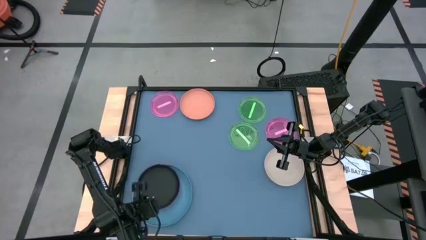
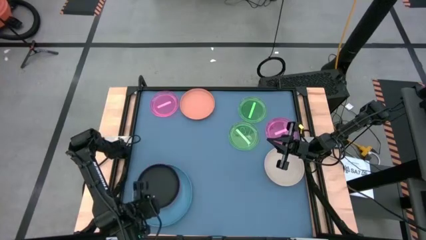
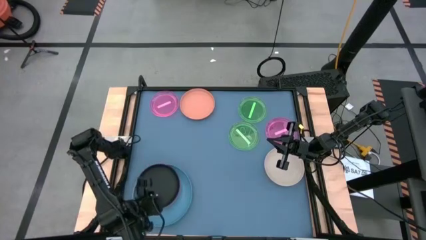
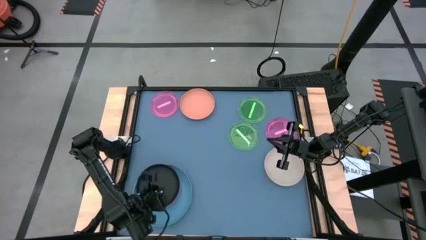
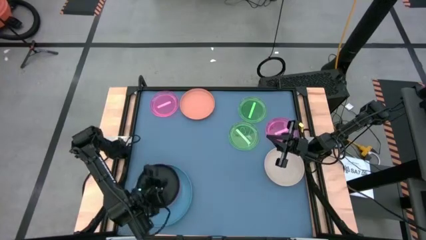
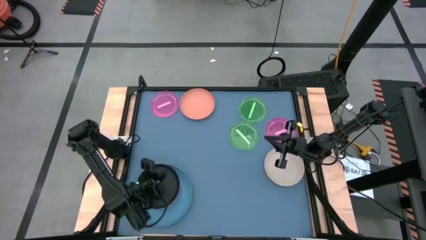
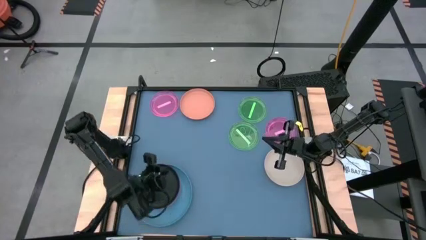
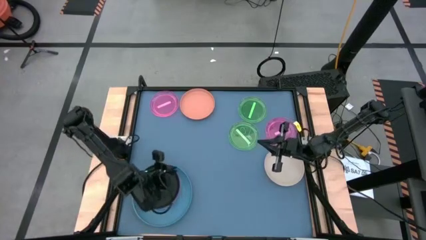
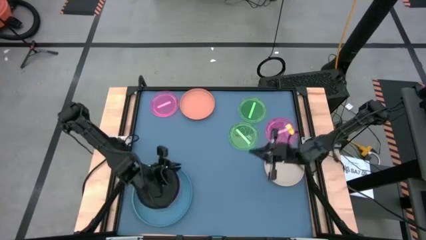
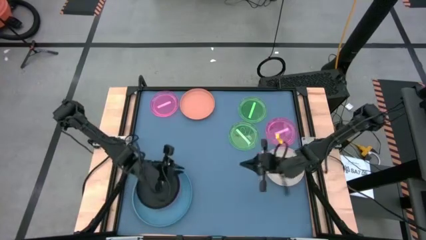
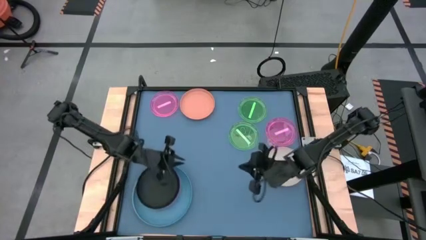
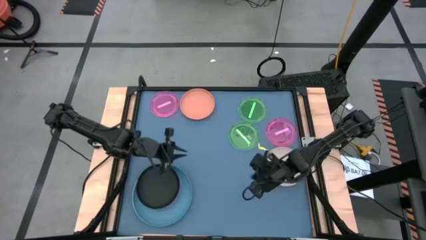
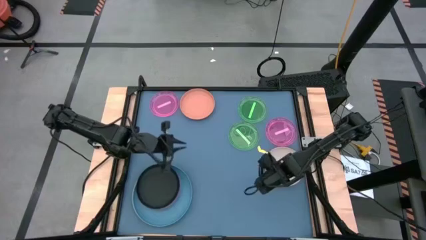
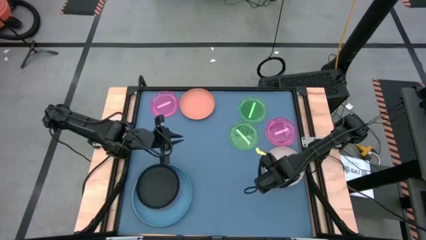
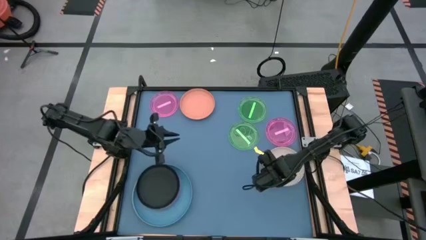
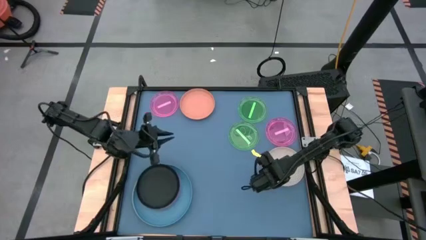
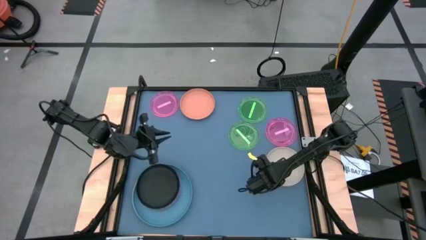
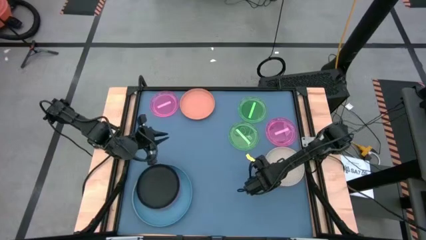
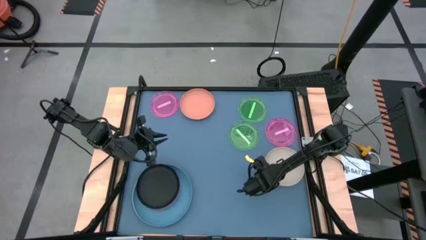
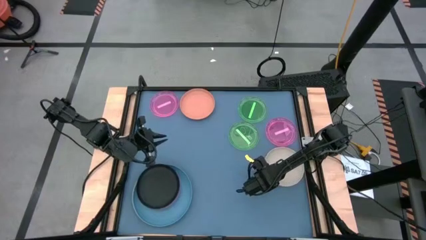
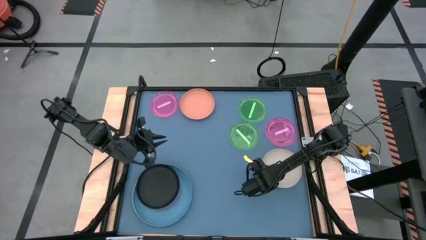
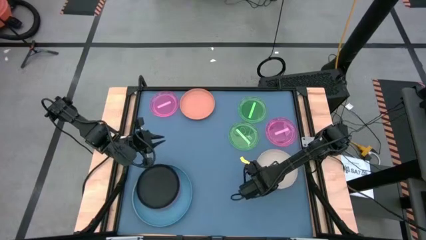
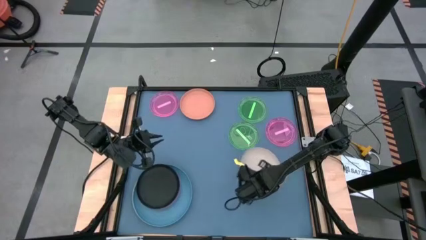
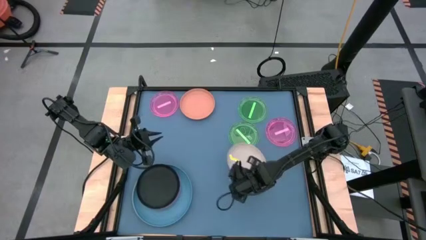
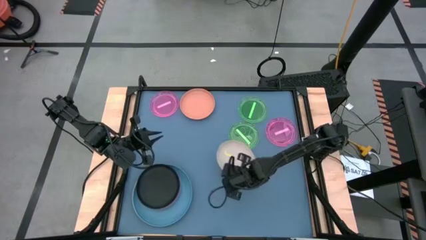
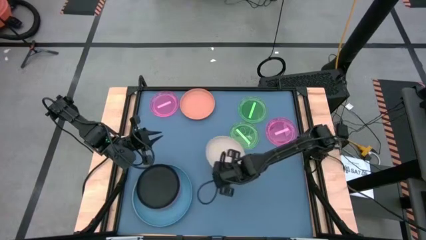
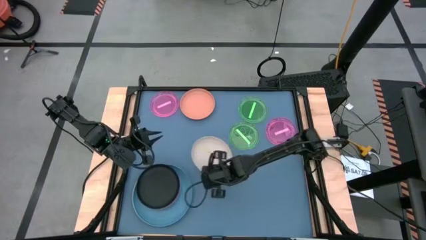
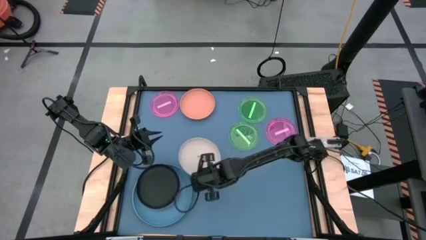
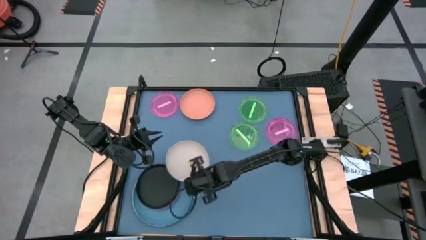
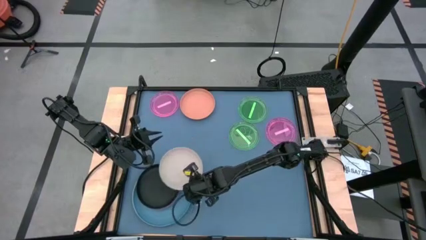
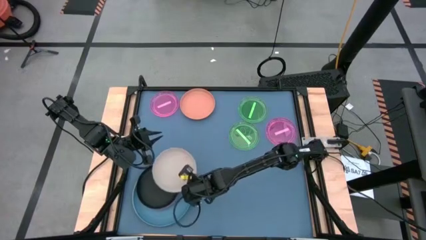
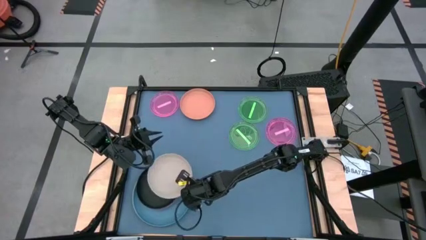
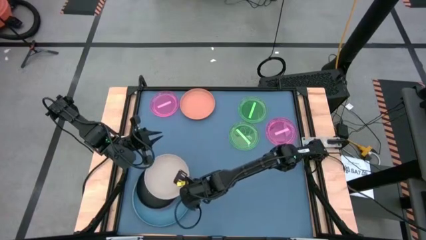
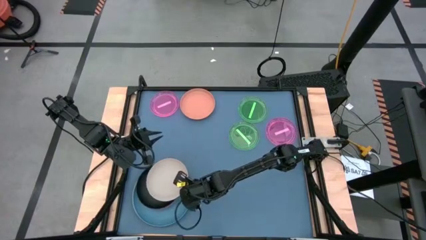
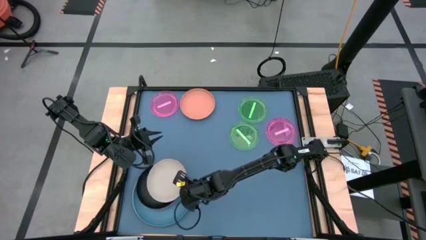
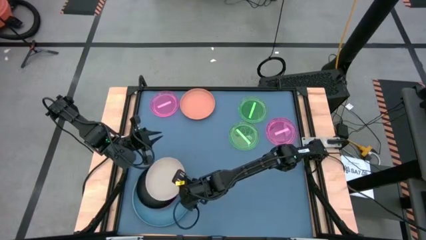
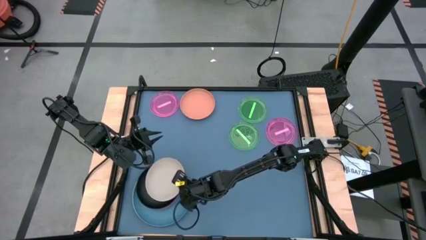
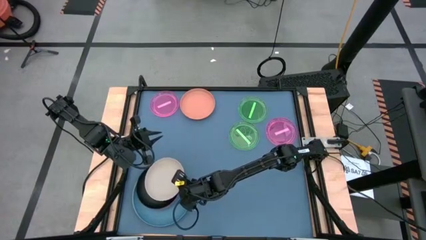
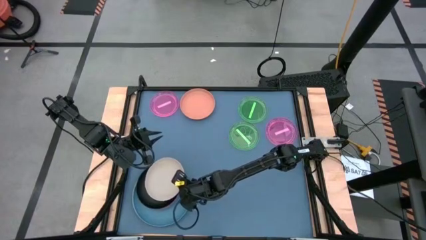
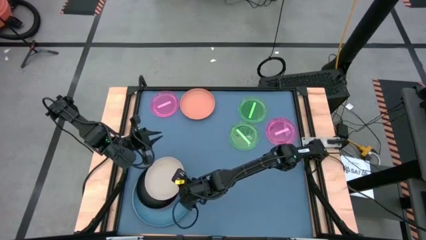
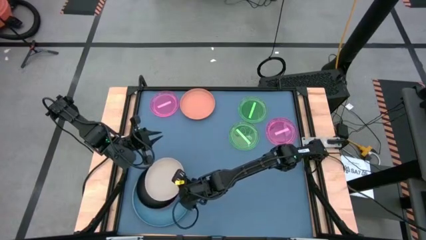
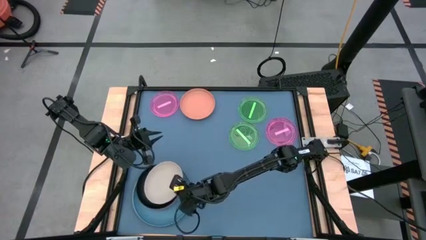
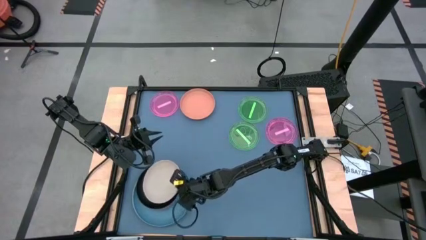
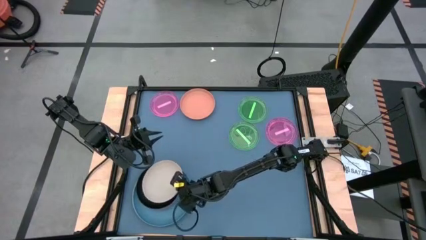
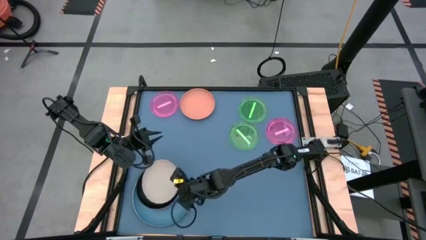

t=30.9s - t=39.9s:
Task: Stack plastic plates
Stack the white plate on top of the black plate

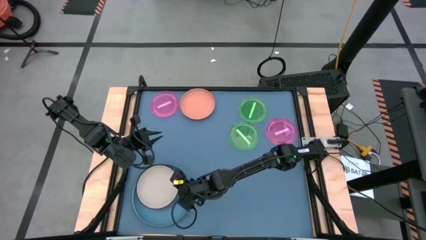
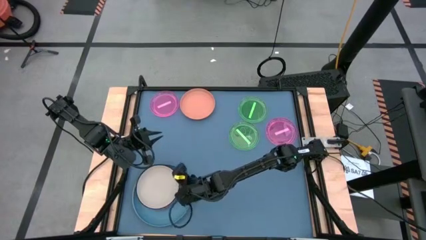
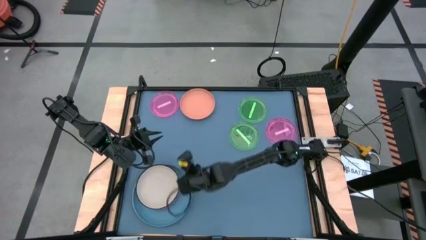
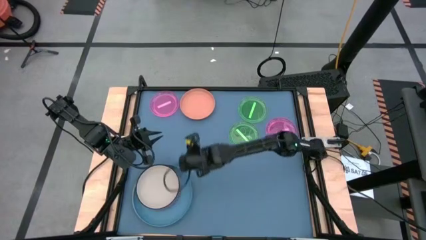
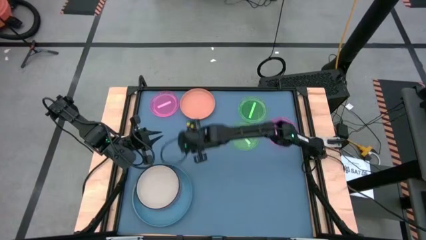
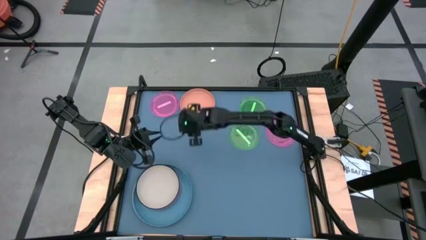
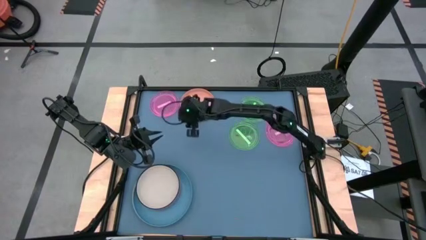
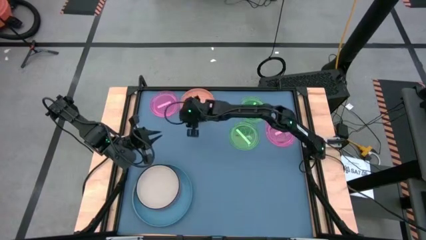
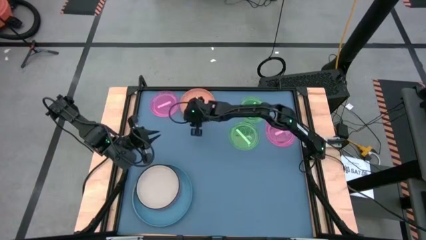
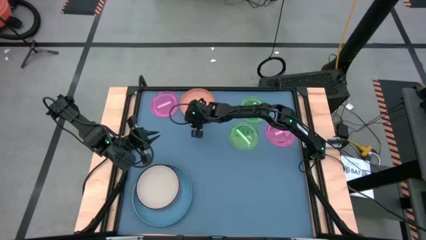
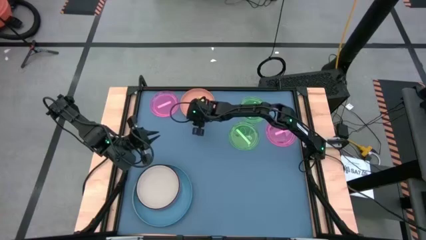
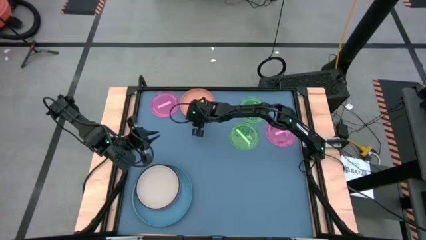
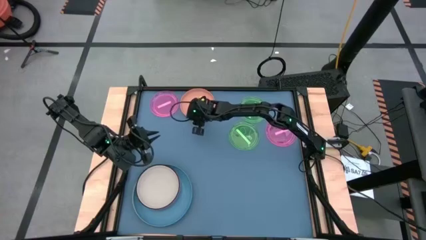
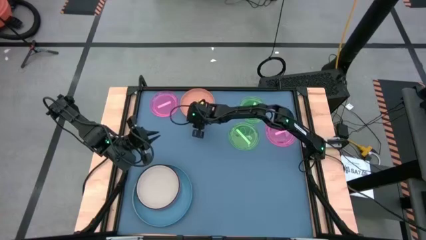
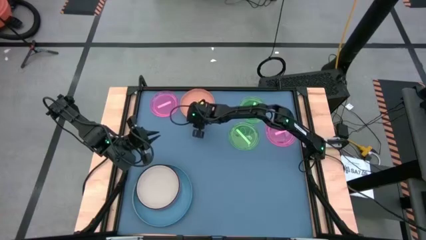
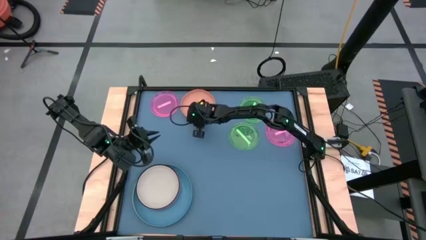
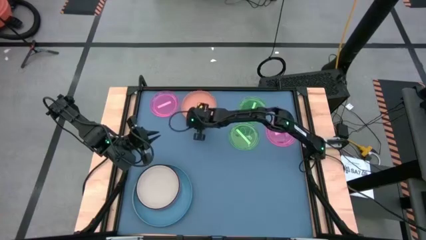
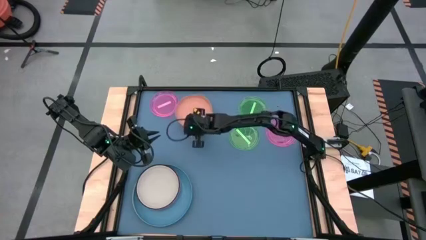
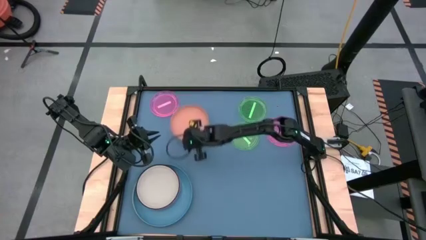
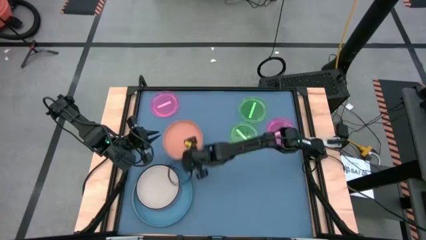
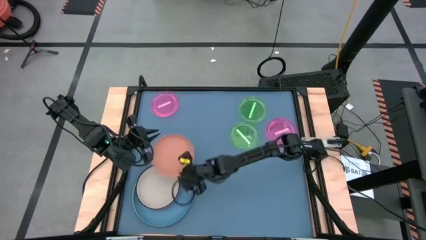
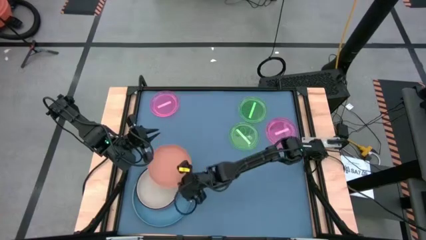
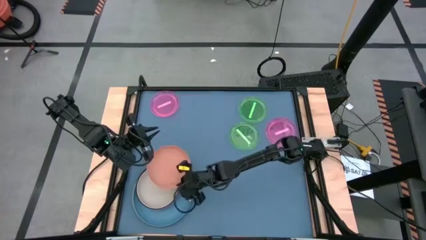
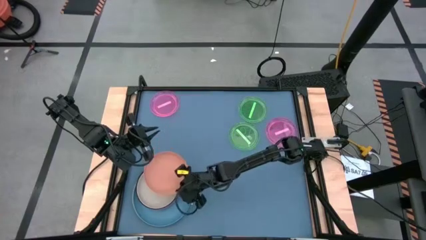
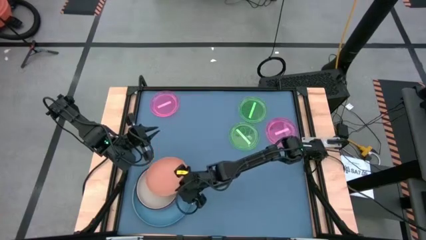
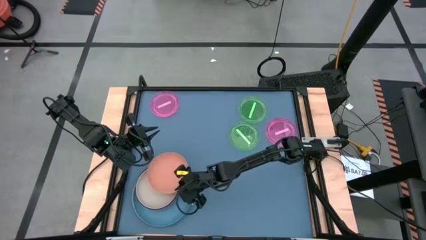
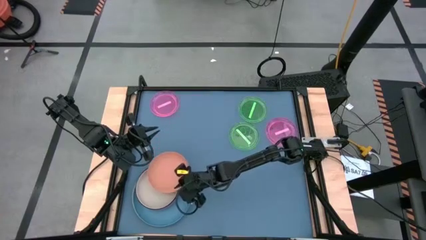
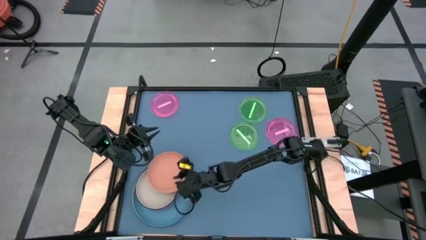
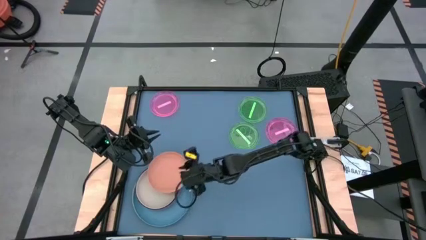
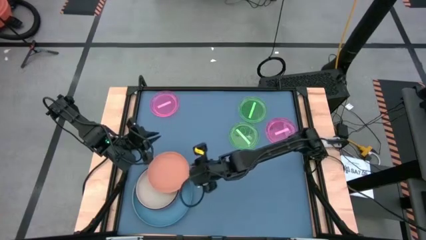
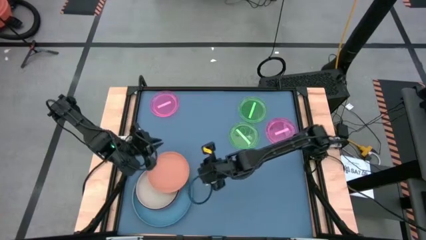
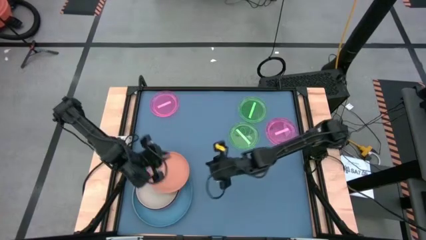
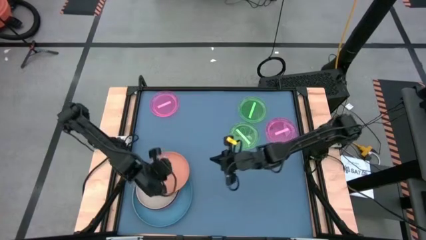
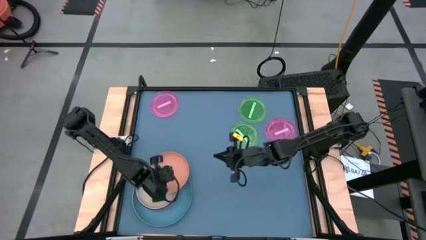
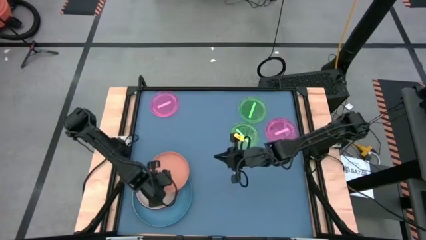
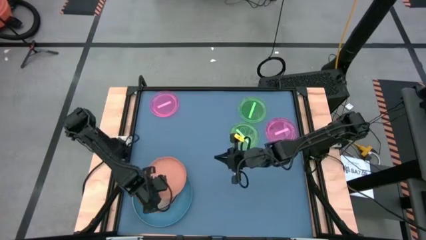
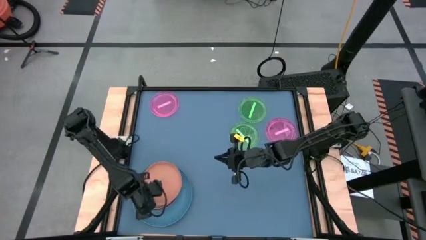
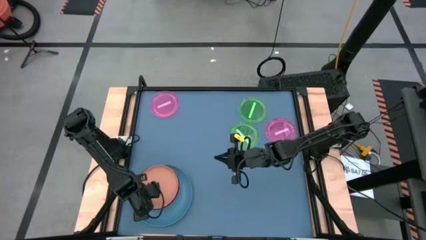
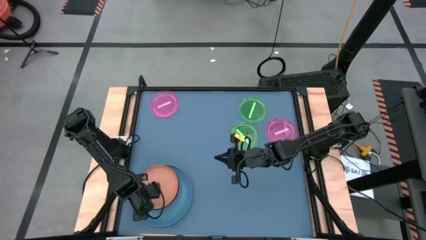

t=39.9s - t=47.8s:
Stack the orange plate on top of the white plate

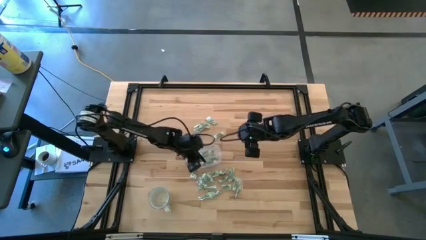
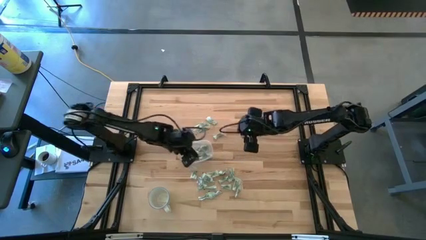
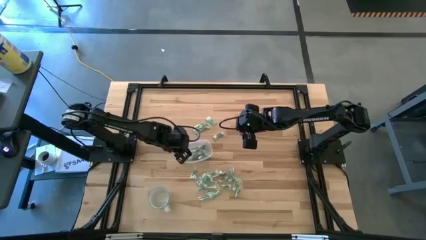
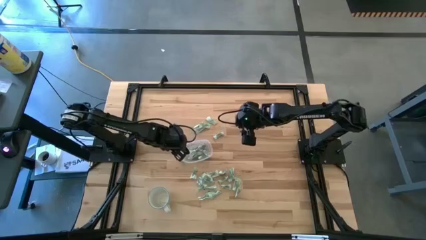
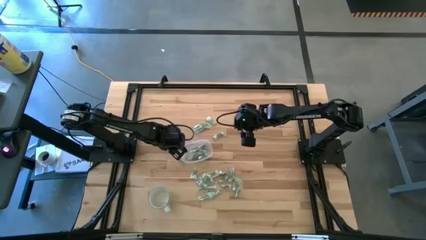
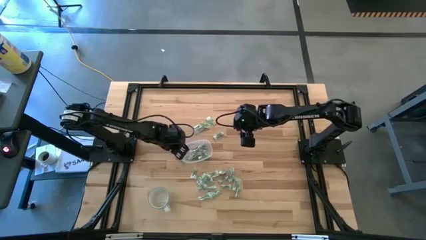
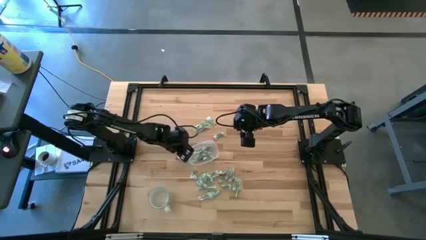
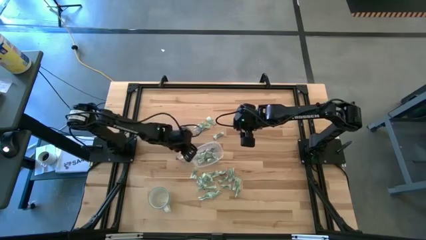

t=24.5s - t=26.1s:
Task: Pick and place Stevia / Truvia into bins
Adjust the transparent container
